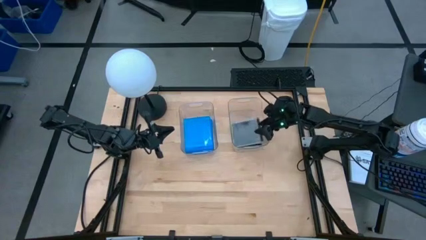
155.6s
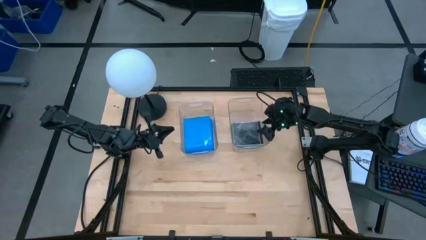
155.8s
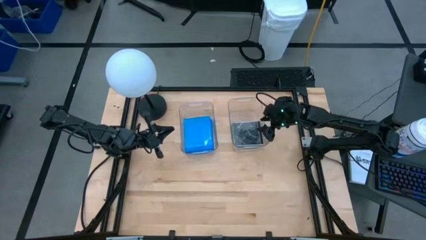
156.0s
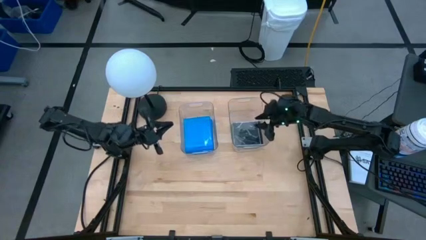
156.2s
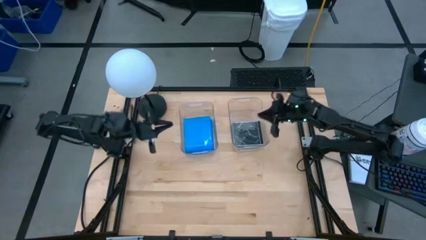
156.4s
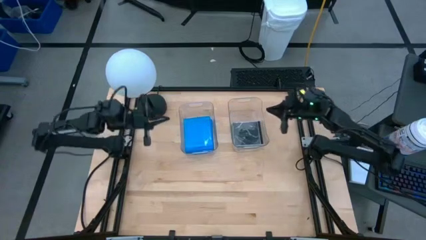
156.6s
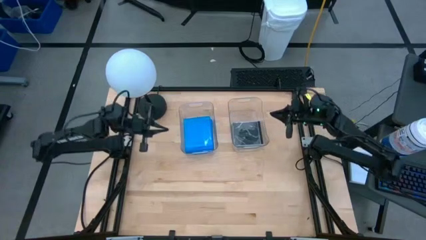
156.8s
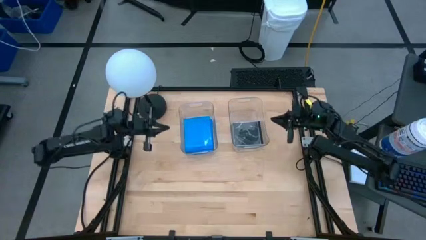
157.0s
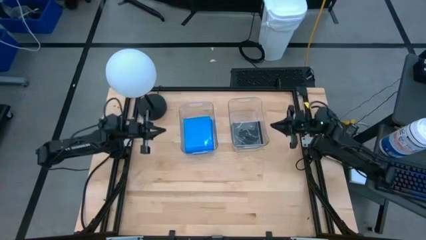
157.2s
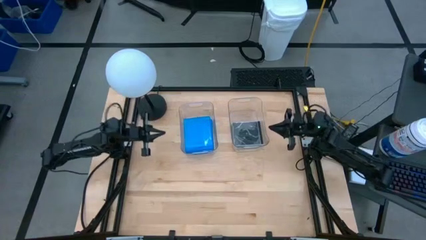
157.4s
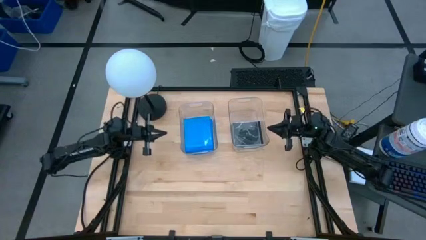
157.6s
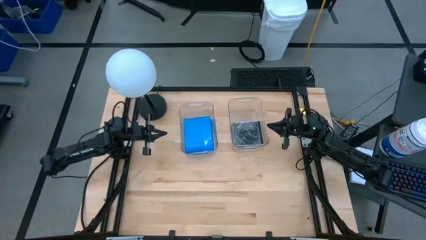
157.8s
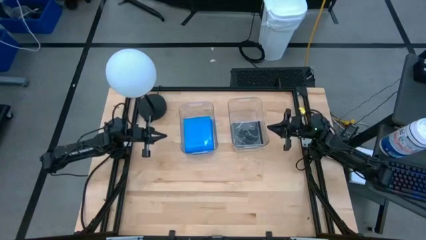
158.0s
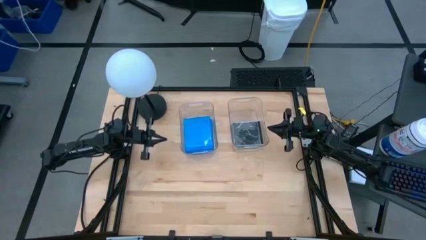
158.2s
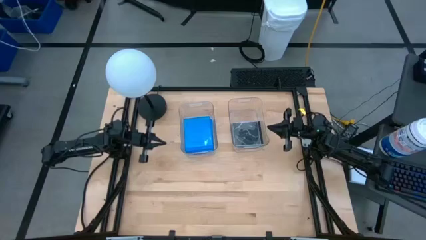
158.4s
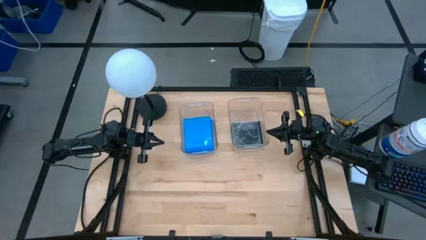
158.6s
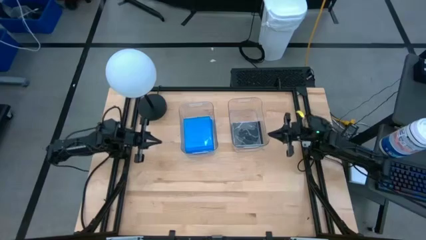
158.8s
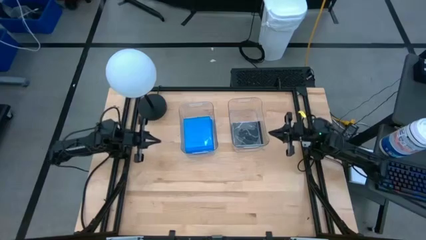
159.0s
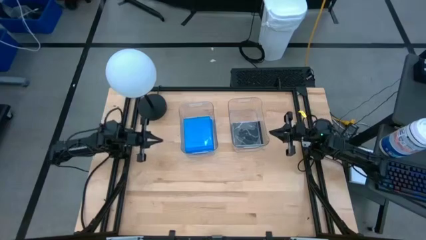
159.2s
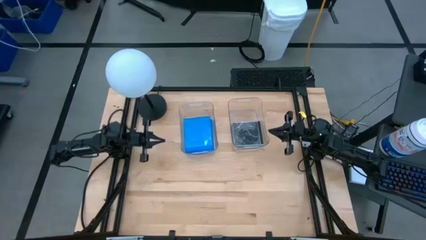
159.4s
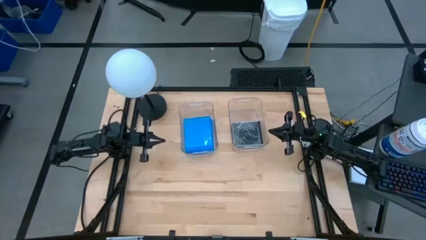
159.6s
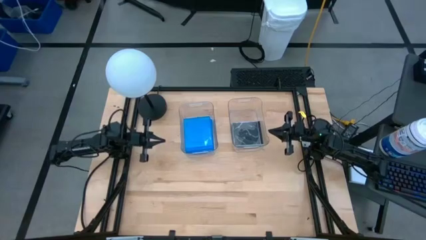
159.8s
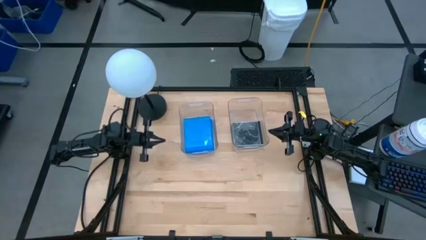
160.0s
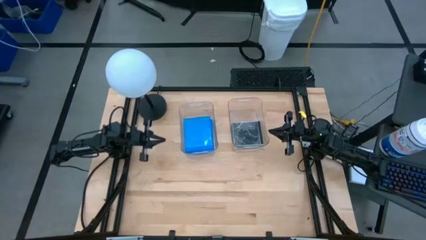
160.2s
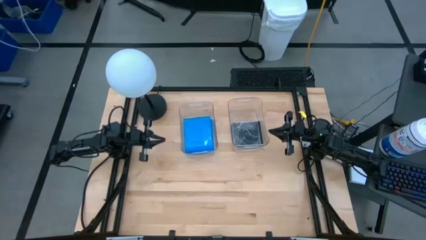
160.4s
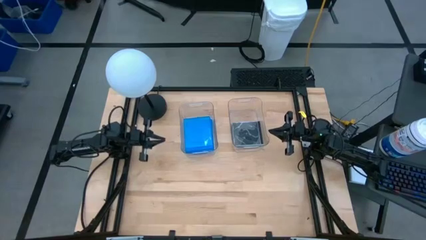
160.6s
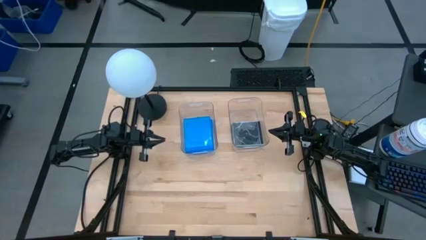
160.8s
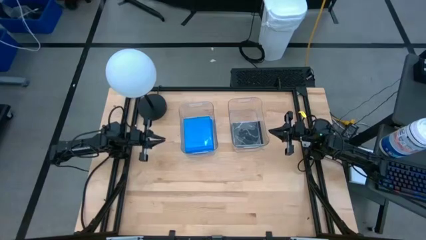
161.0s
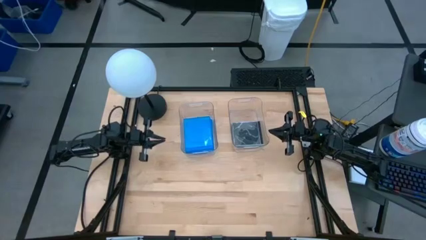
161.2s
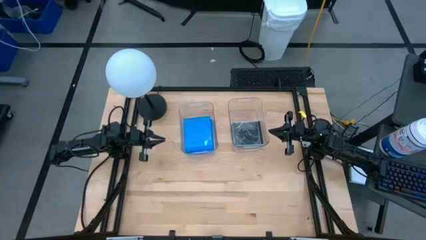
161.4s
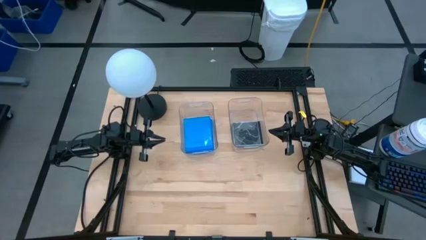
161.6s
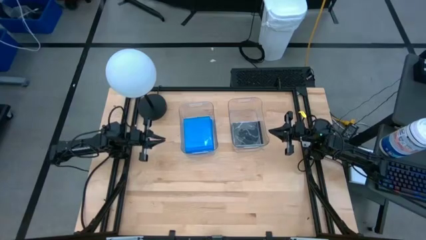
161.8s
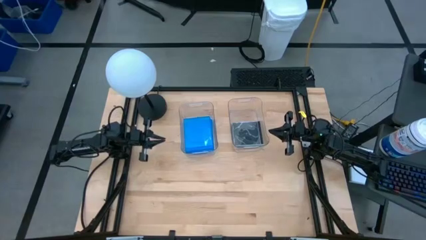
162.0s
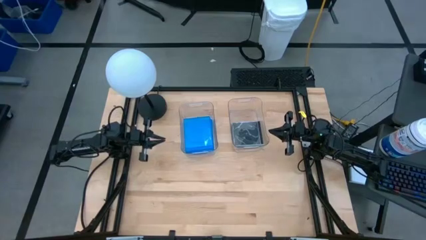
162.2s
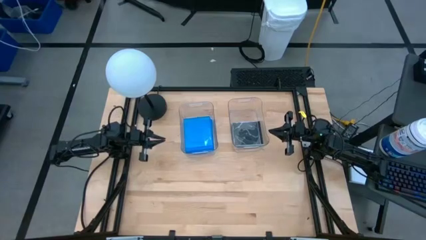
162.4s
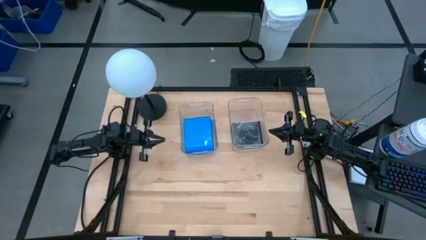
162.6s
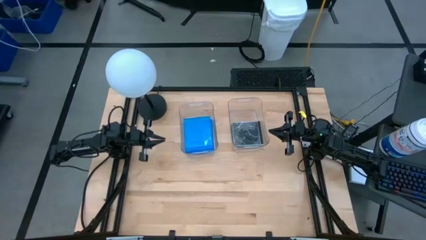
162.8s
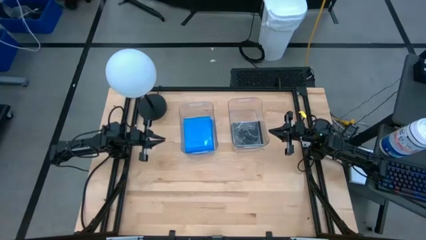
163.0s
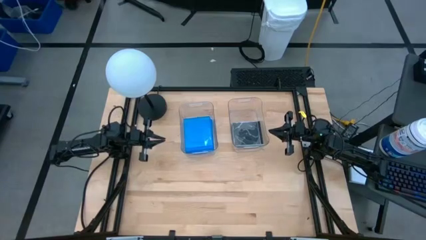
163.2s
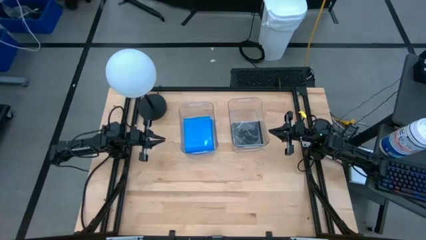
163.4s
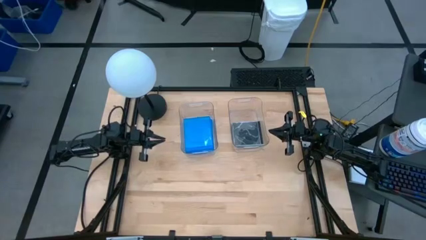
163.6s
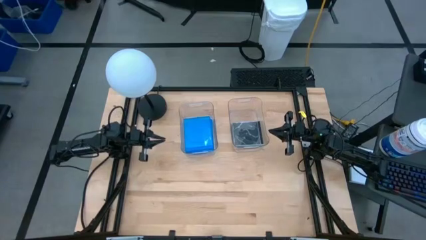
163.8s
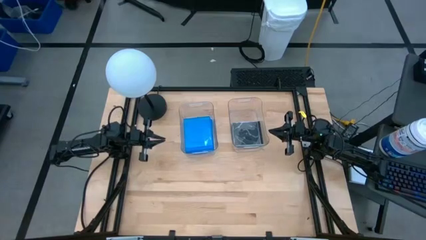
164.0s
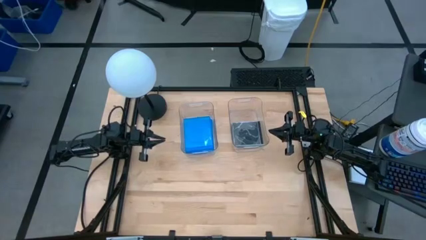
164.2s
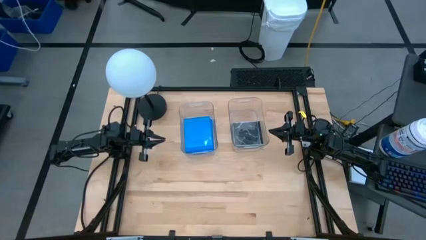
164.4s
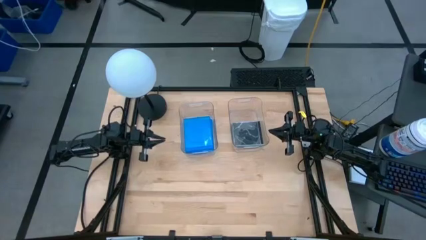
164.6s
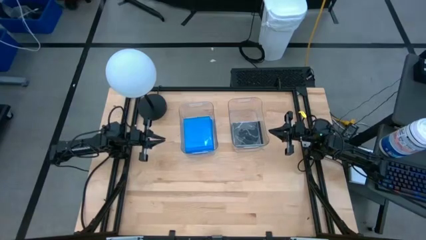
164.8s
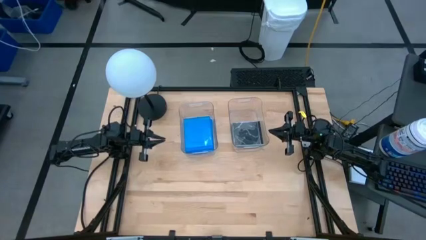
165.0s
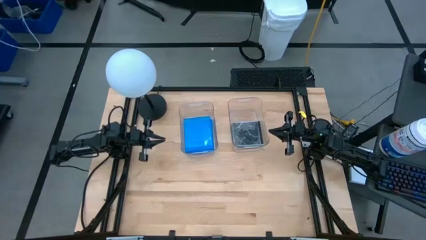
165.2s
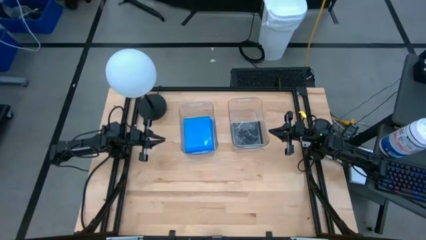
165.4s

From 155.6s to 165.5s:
Task: Pick & place jewel cases by type
Return to Home Position

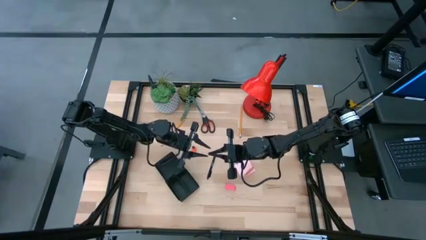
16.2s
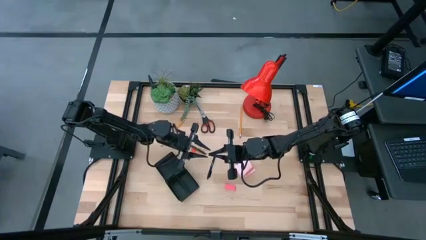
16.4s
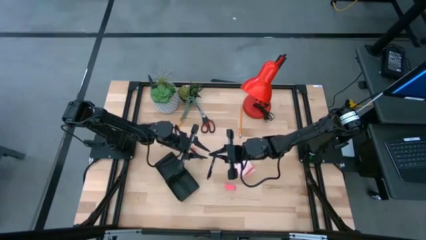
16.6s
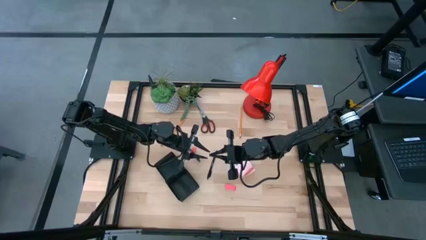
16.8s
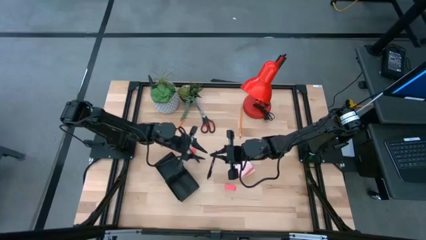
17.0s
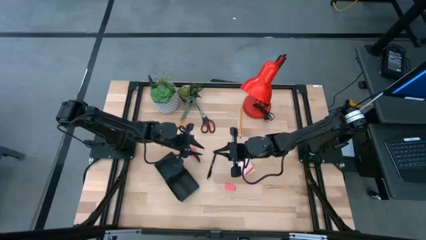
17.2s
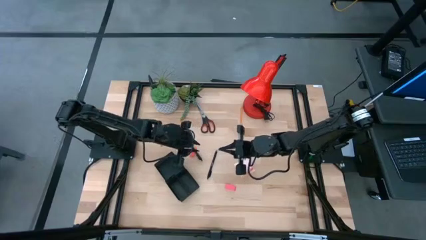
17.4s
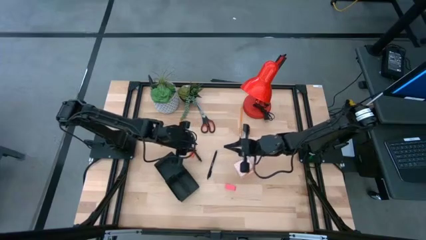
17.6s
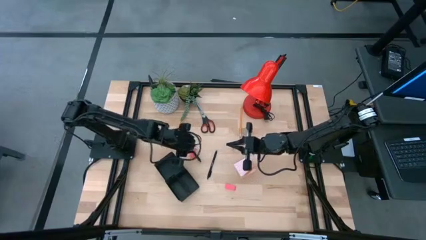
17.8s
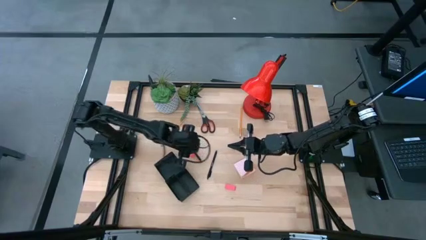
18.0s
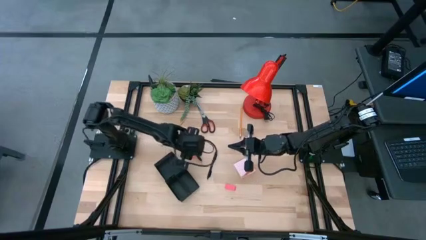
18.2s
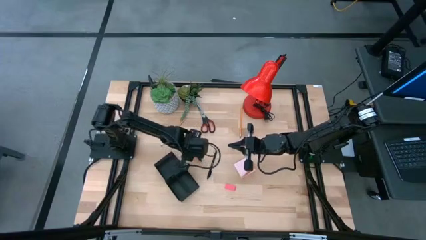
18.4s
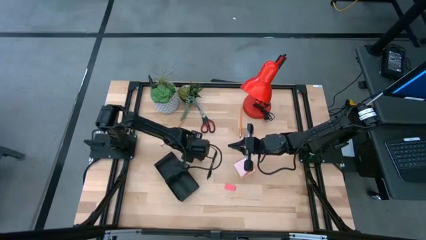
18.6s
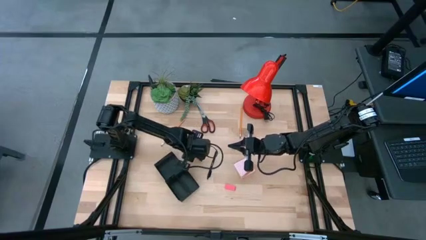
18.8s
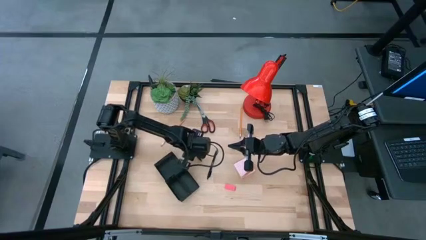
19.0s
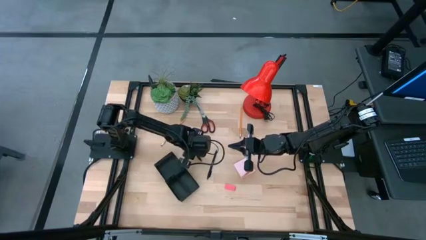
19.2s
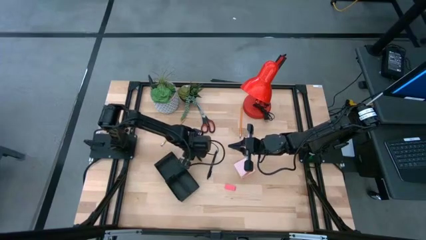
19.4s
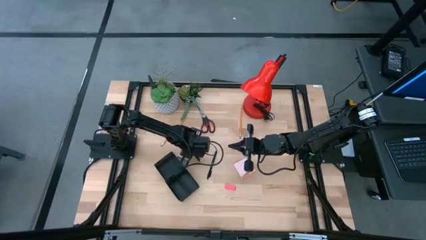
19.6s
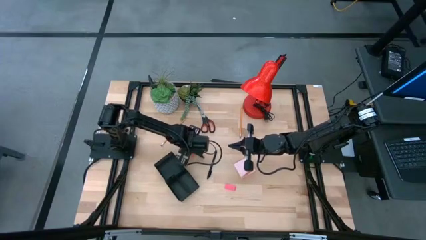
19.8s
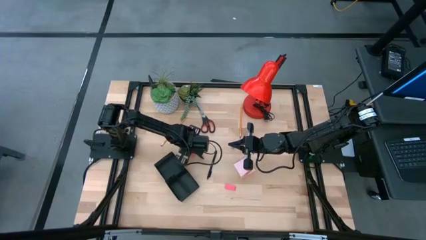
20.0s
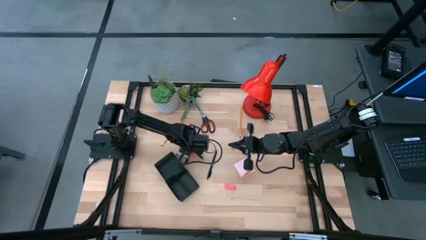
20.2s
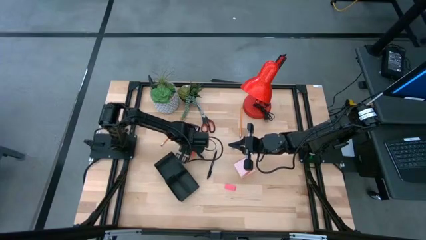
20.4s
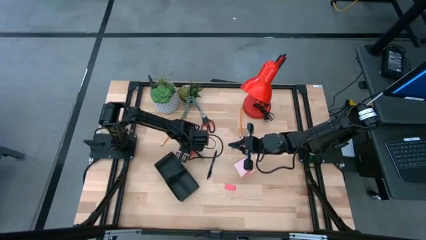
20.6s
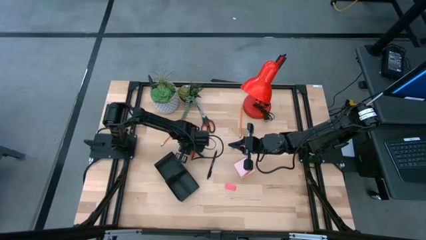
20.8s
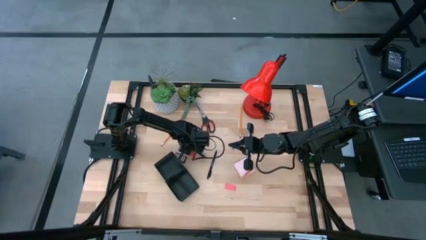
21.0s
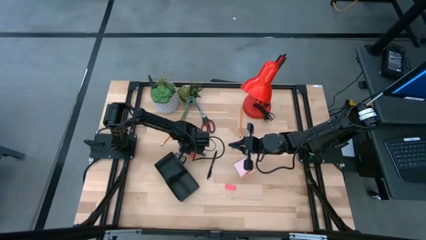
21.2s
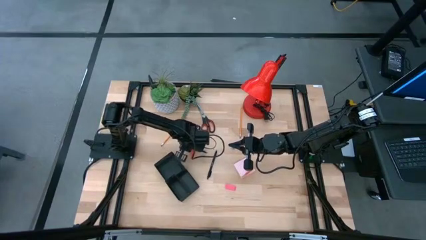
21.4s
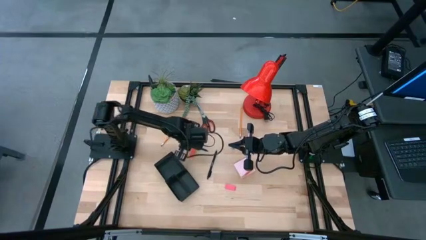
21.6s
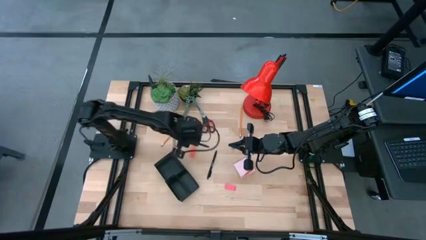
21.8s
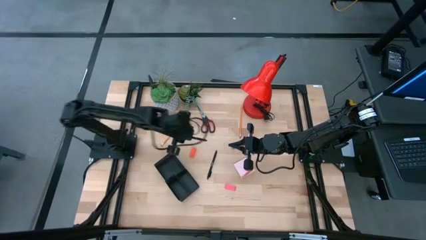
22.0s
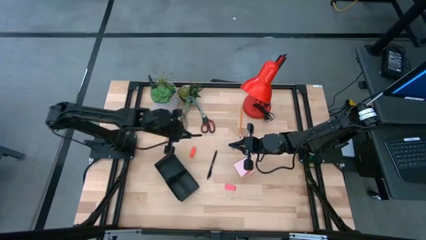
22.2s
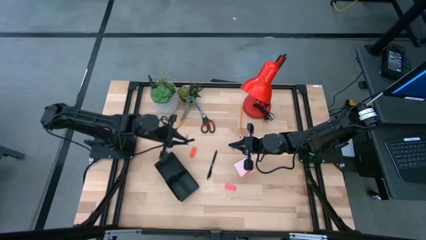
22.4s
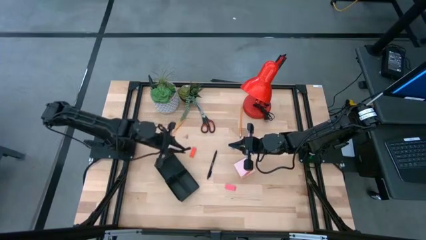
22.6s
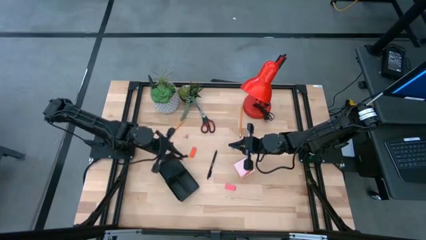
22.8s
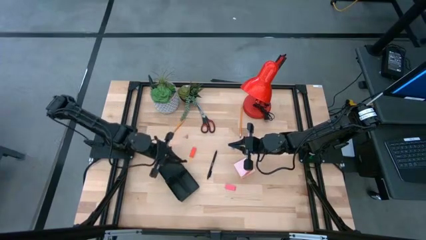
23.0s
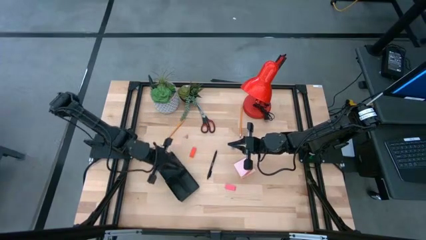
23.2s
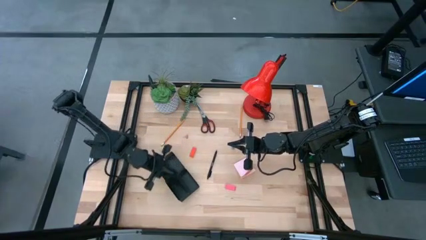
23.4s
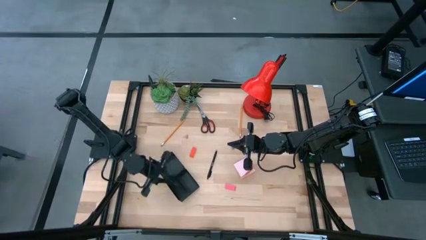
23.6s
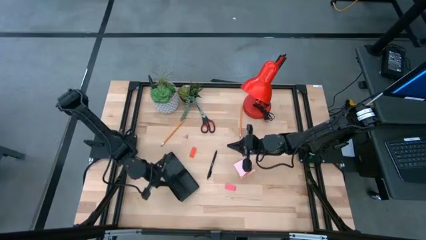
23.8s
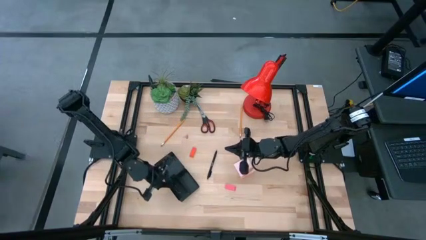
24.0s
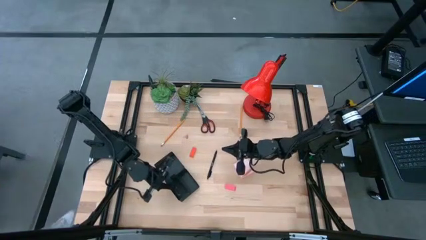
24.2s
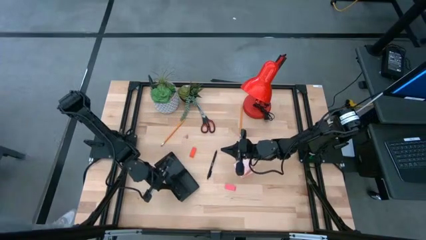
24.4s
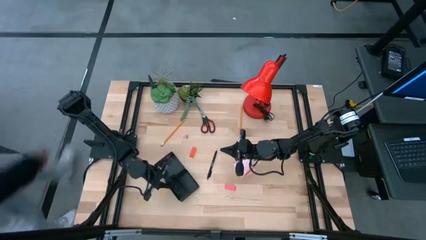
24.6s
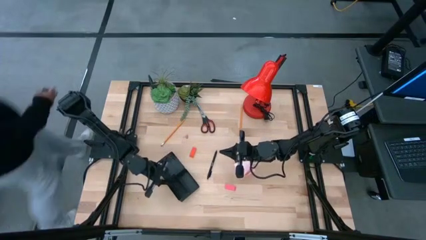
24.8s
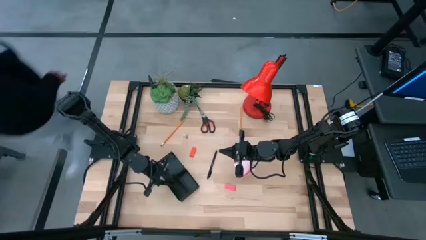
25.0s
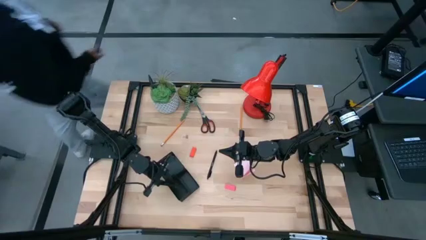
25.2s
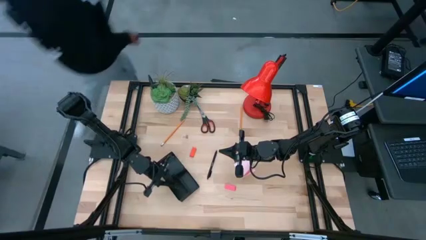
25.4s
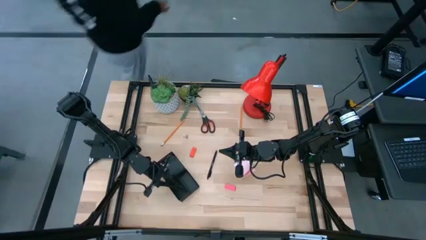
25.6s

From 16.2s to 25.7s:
Task: Pick and place office supplies into organizer
Put the right black pen into the black desk organizer
